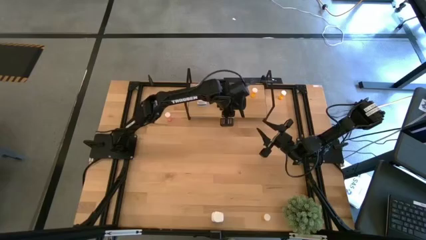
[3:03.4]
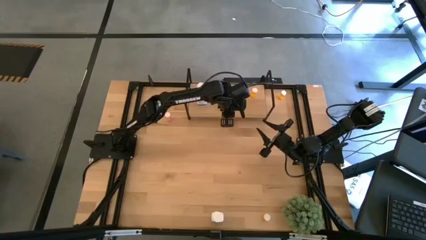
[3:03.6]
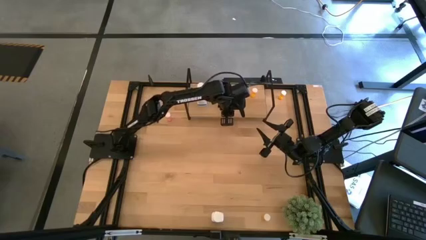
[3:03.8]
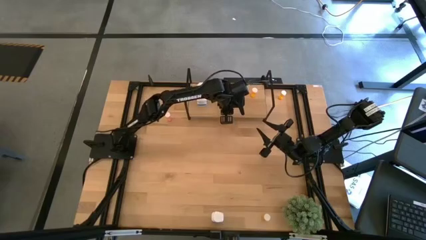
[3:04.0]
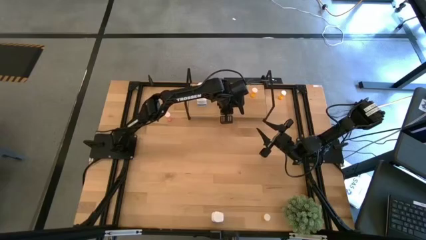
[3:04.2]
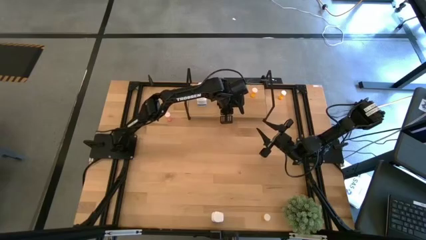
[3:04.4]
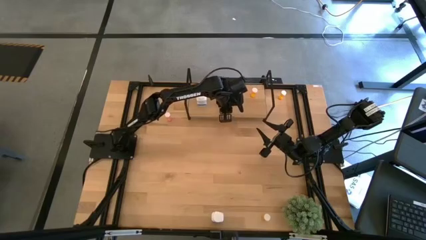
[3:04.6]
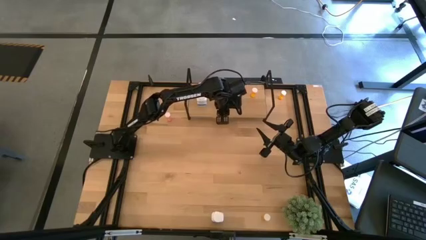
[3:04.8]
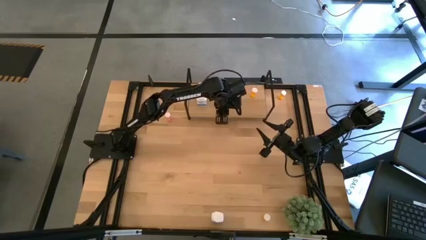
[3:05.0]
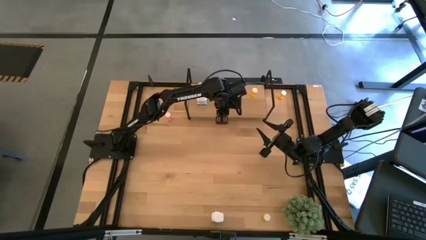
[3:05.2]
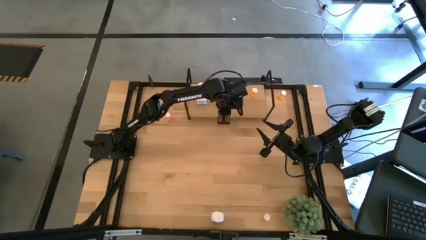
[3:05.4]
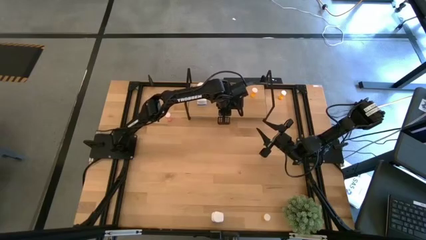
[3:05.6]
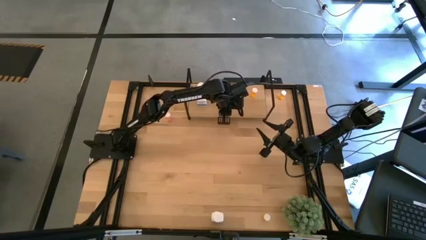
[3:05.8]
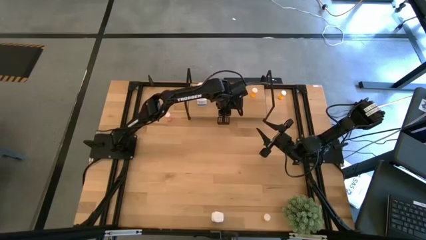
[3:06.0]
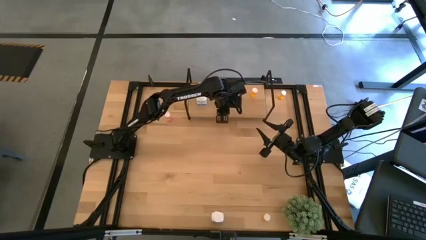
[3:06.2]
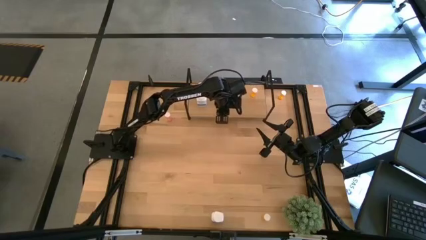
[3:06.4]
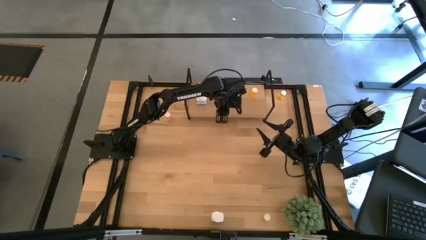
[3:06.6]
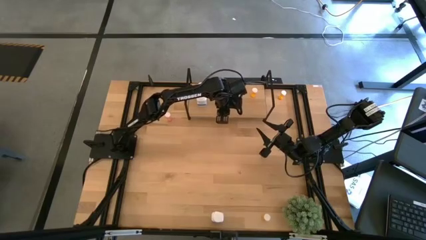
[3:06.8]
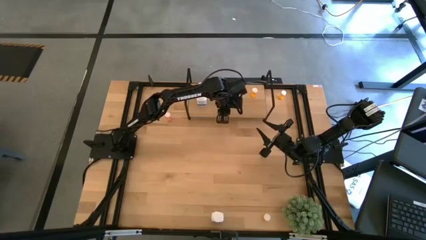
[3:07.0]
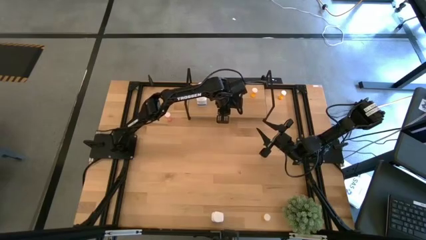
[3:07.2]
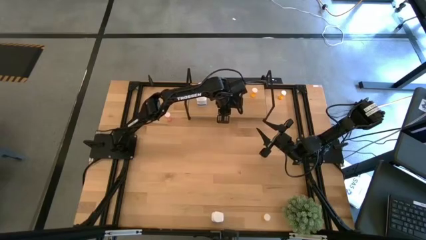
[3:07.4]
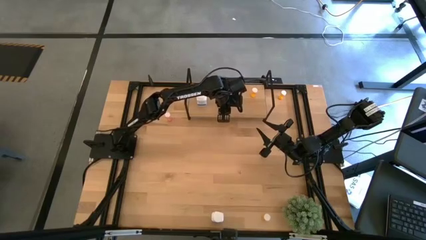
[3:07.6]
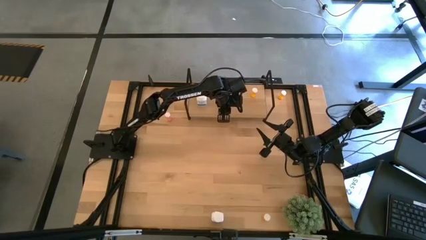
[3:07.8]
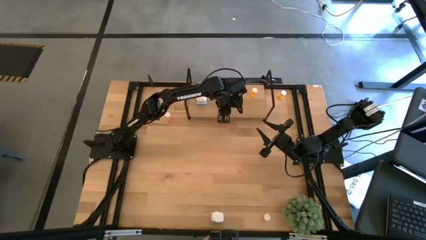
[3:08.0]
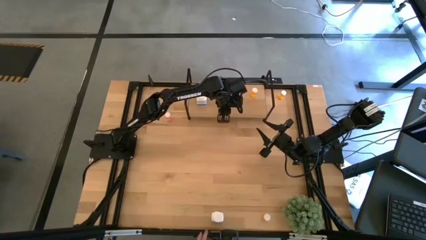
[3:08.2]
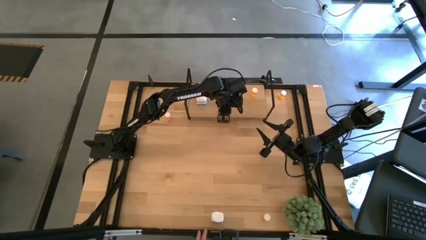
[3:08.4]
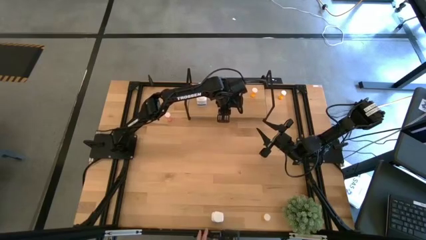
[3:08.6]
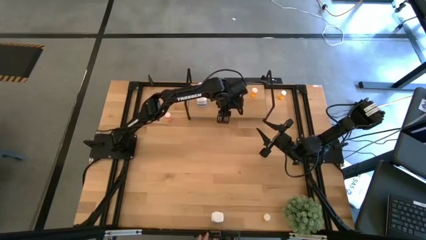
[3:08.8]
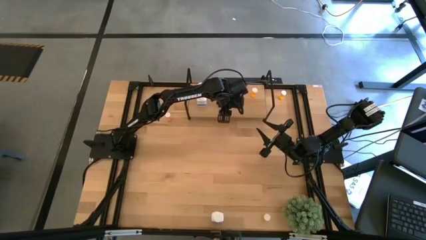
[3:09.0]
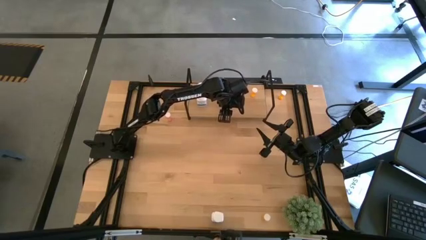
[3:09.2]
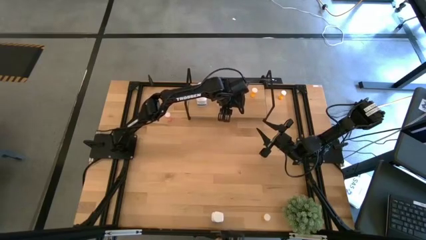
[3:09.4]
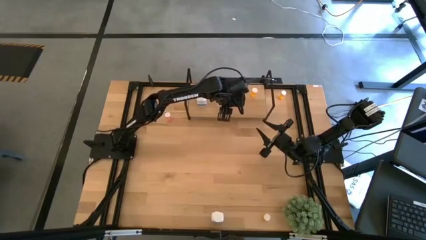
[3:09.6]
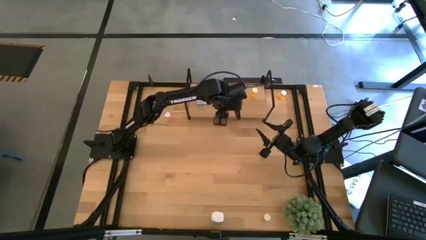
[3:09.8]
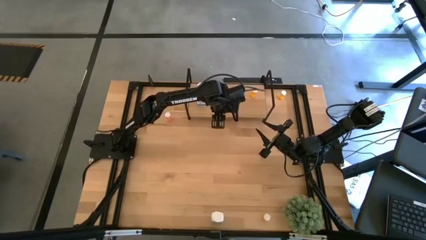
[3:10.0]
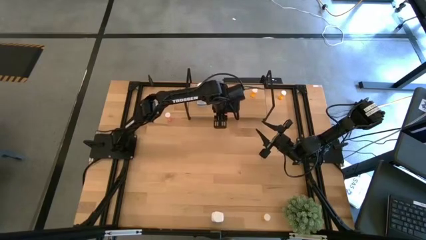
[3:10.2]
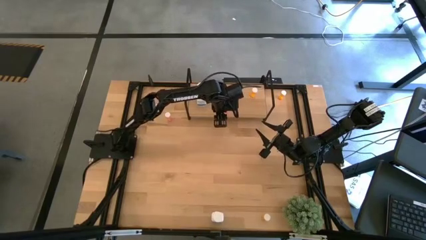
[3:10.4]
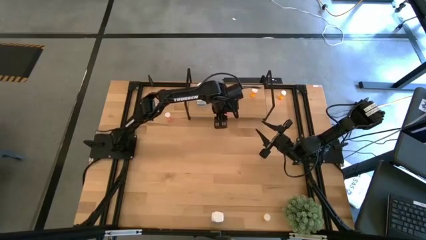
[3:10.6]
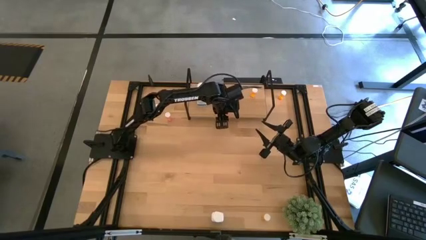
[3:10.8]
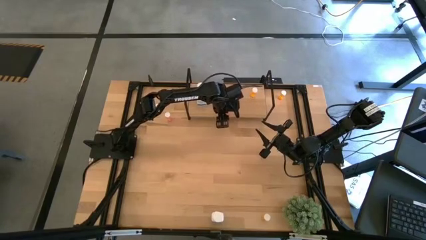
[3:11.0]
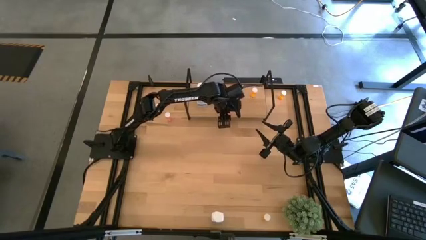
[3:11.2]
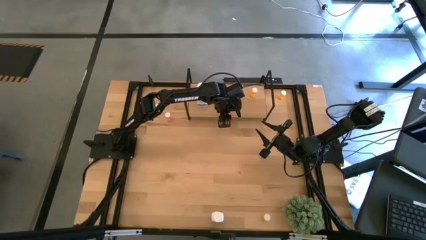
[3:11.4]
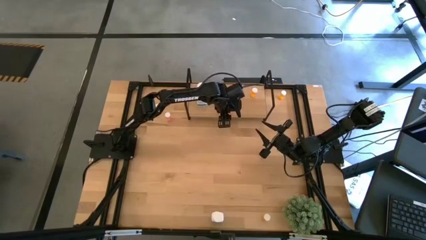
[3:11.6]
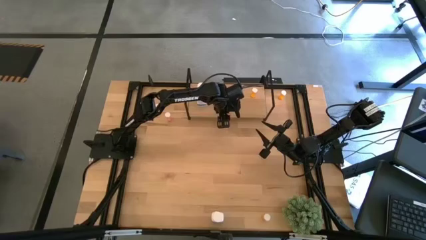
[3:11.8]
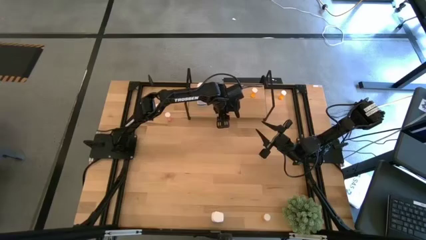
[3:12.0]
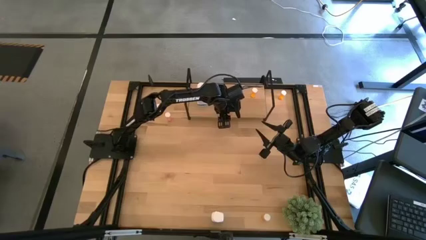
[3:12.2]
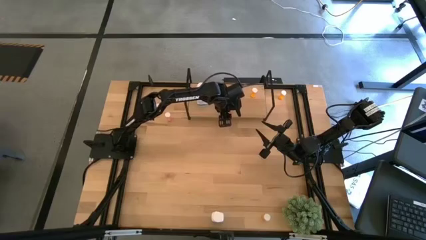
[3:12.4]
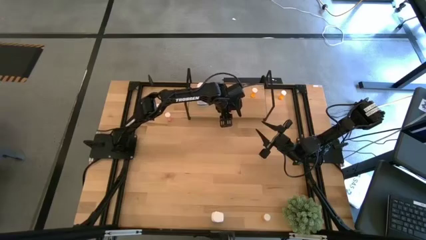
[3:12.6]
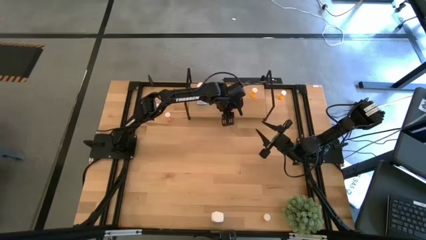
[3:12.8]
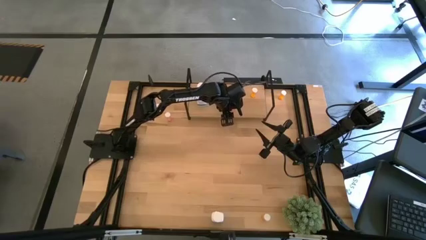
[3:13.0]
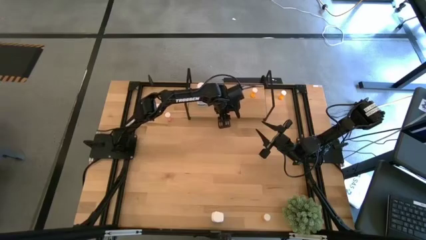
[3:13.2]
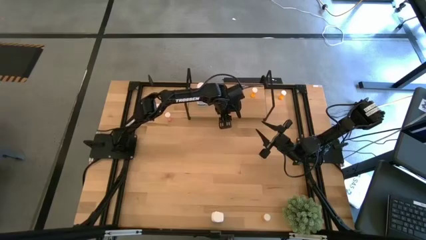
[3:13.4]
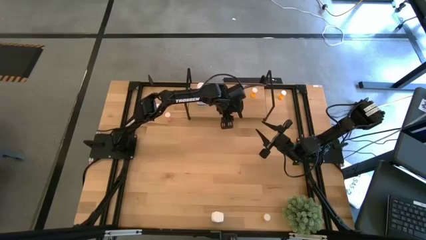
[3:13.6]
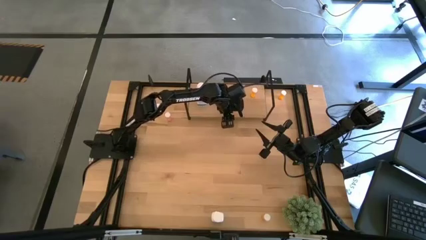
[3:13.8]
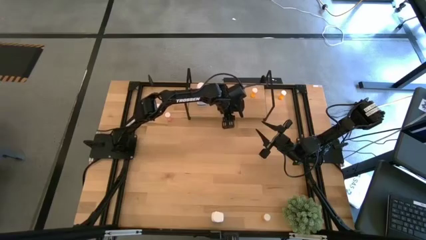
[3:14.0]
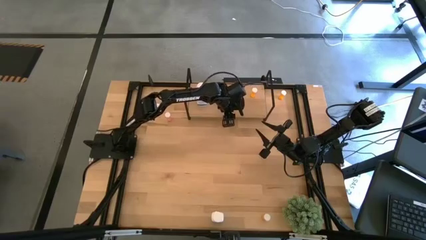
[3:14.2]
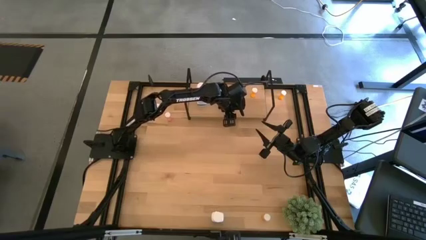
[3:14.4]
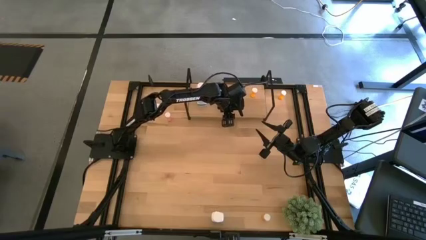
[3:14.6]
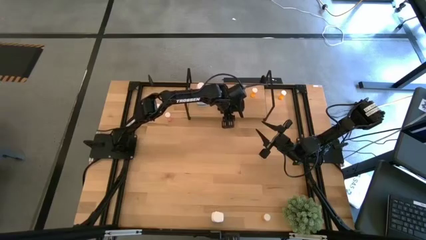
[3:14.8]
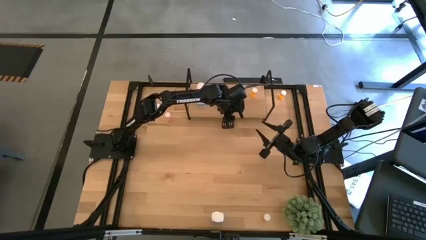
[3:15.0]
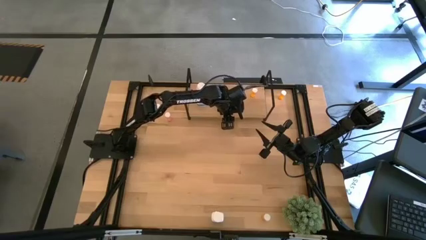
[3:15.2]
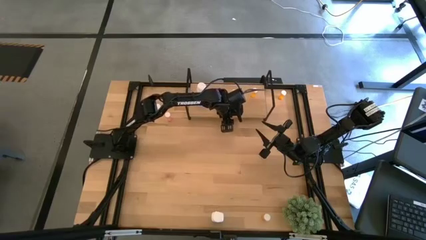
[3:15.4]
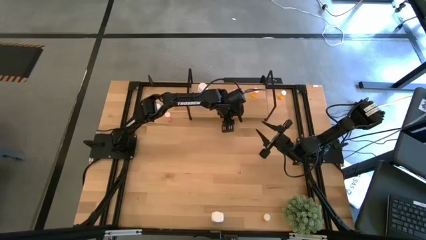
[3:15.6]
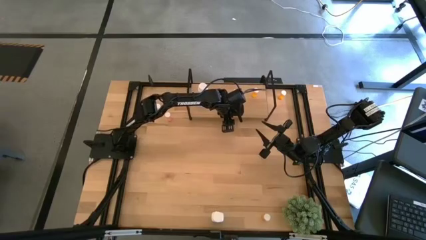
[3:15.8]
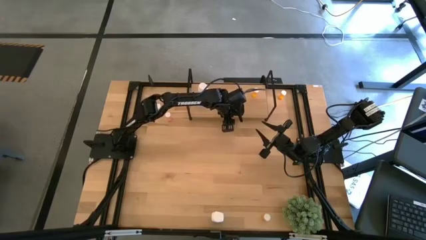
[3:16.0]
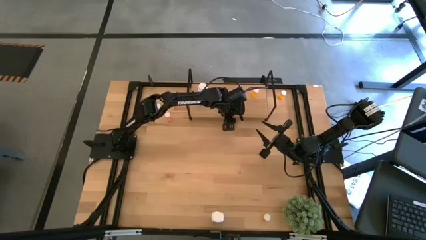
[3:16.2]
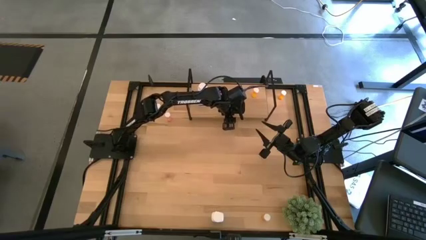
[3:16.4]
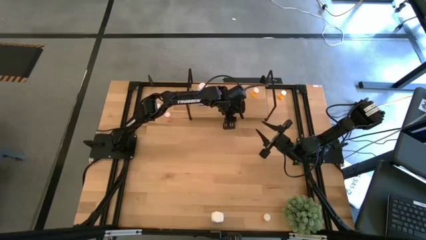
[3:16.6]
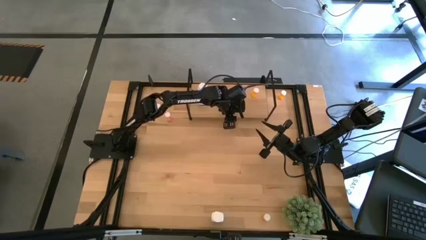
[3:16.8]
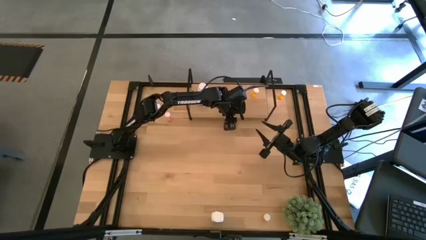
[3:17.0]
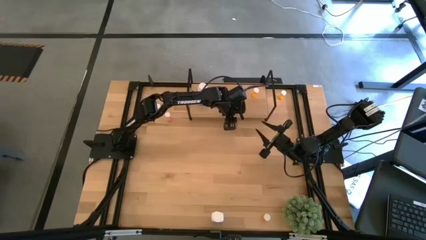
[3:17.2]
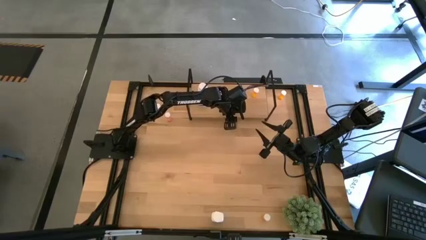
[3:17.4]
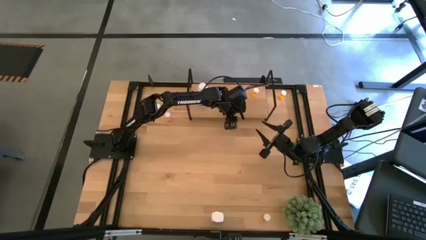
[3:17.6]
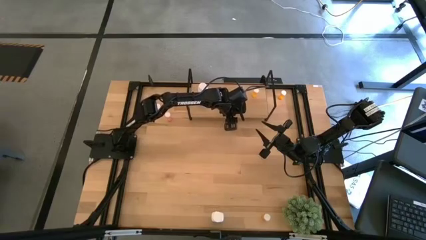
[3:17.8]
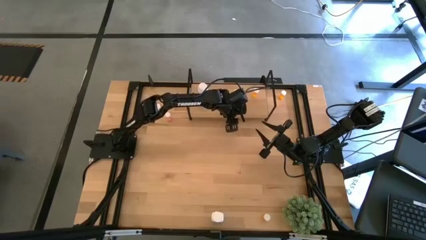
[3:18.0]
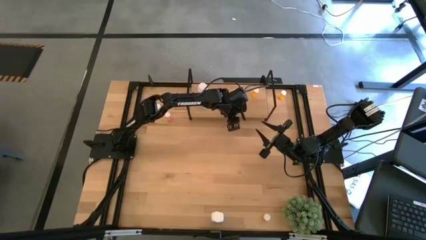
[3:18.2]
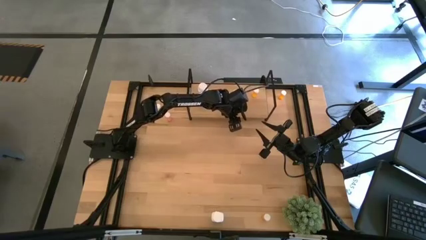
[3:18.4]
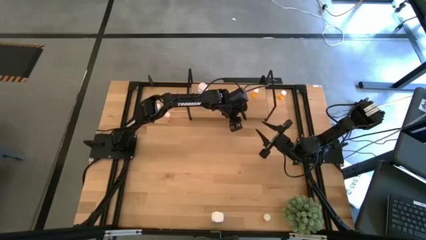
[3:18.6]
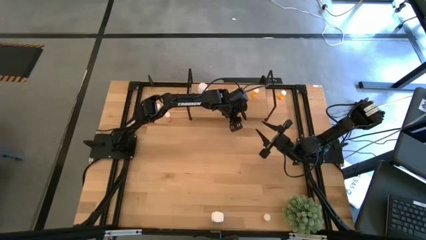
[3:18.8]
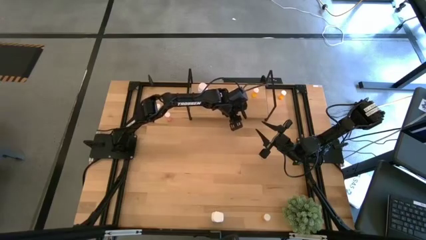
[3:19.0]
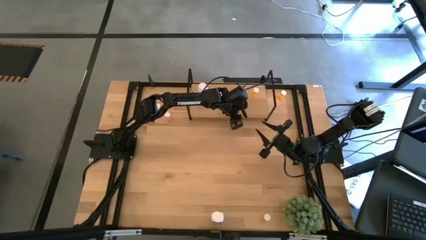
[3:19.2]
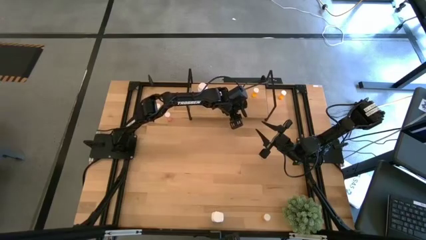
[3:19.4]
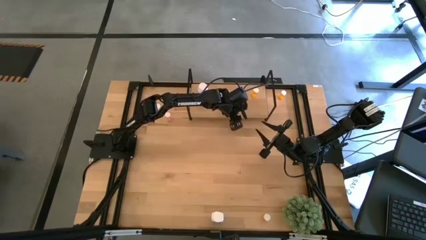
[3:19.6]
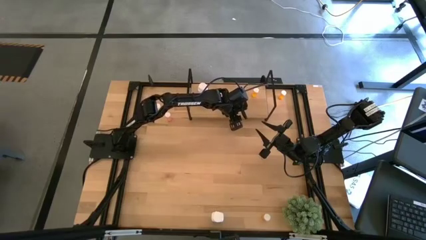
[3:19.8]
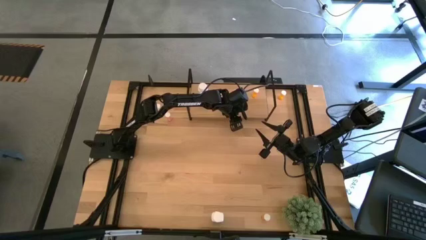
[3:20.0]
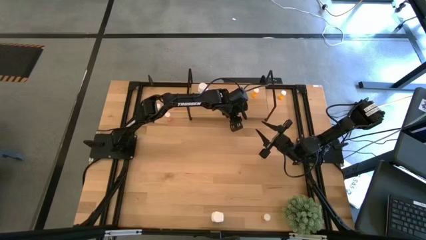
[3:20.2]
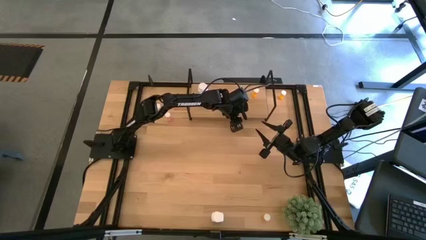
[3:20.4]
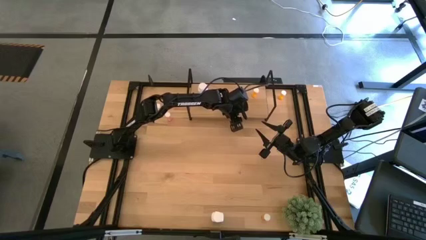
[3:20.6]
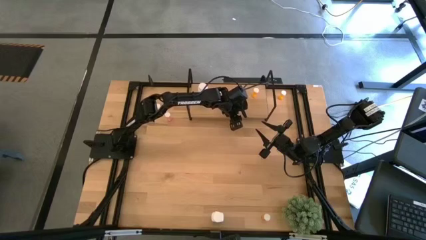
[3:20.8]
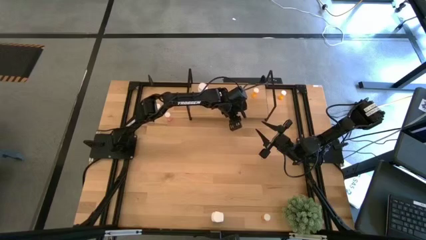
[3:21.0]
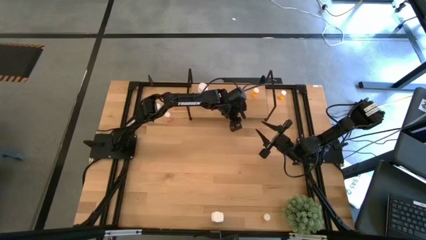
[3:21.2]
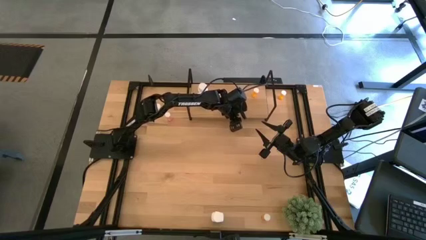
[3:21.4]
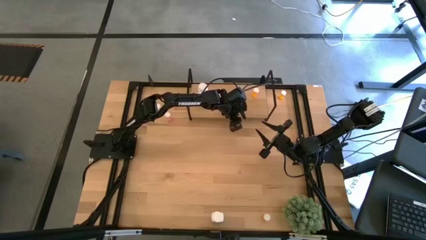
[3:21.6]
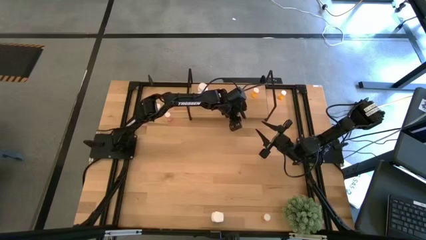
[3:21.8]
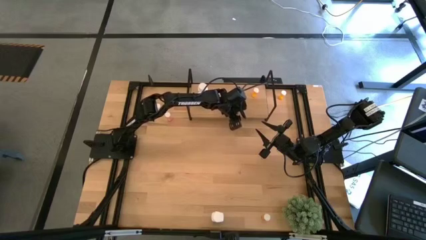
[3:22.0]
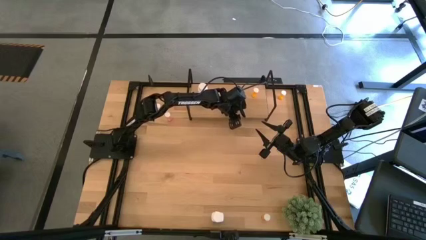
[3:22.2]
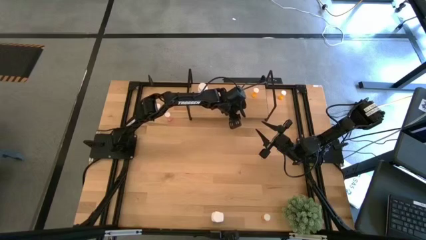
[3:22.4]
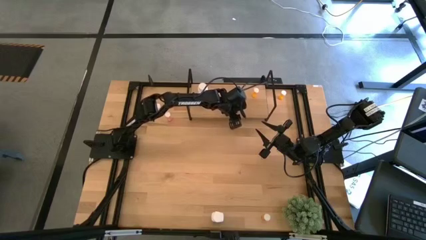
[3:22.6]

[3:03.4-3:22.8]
Task: Pick and place medicine bottles onto shelf by color
Put the bottom red pill bottle on the shelf aligned with the other red pill bottle
